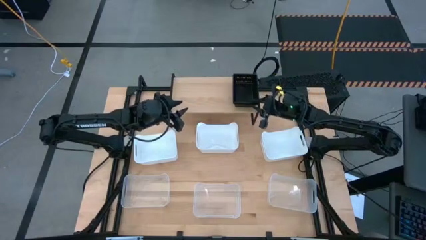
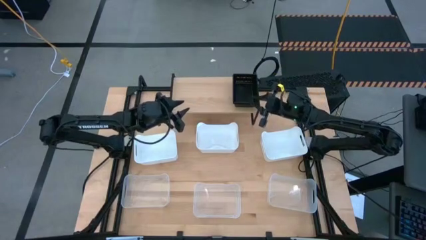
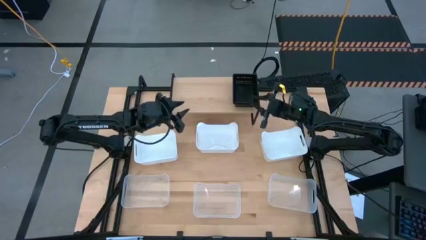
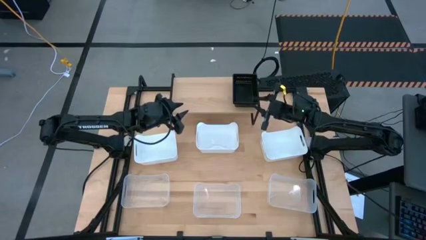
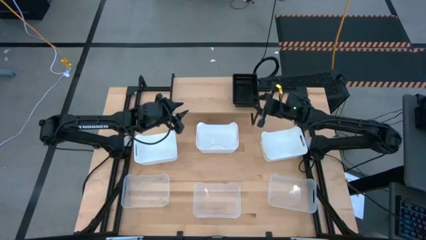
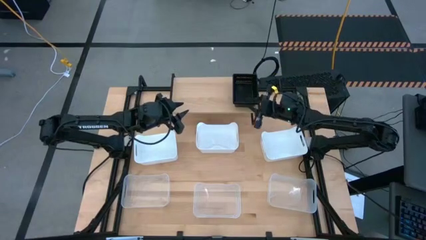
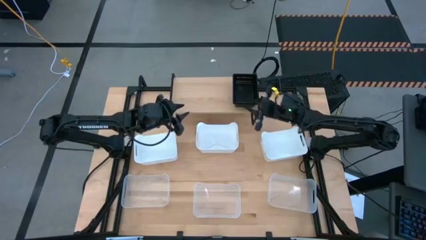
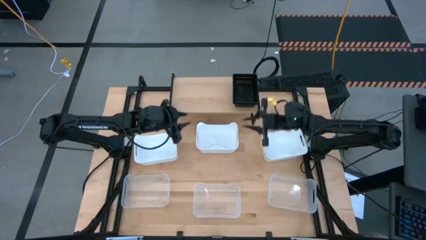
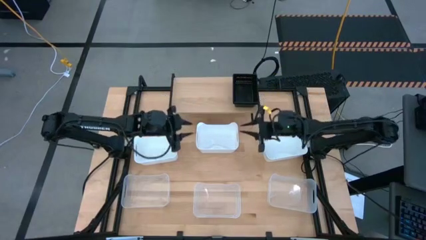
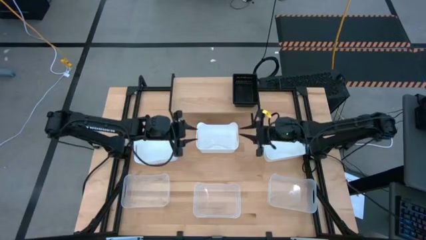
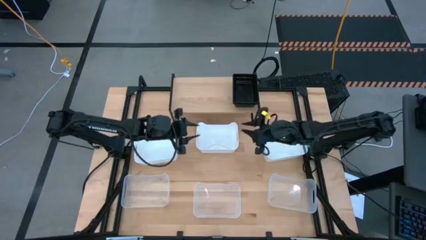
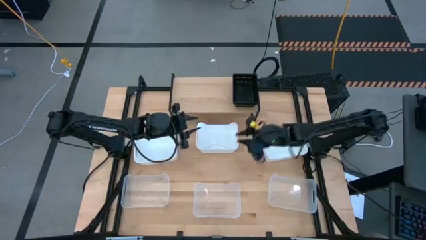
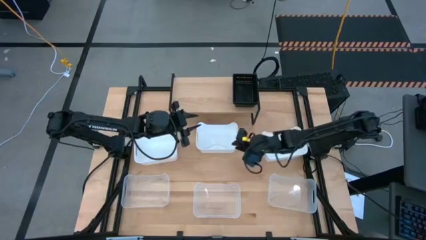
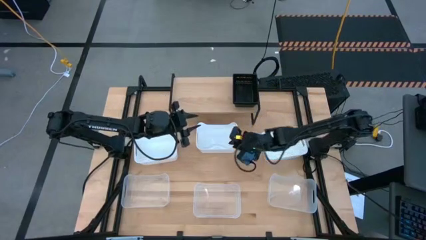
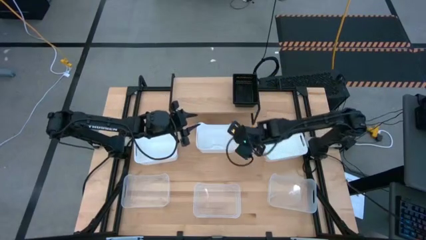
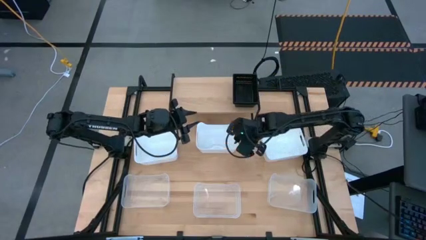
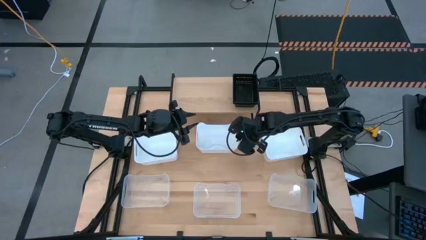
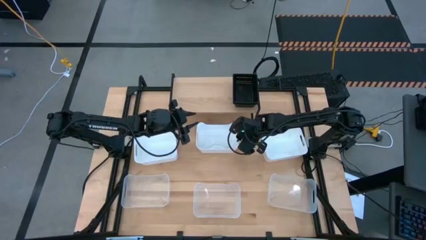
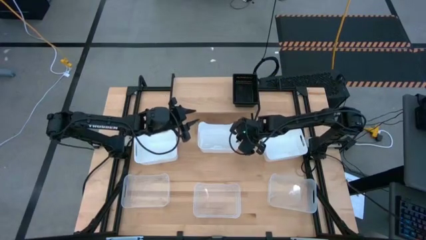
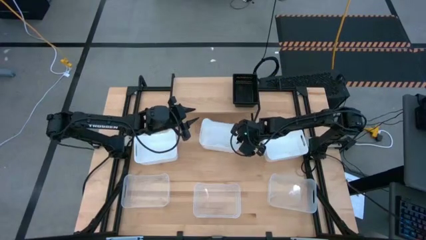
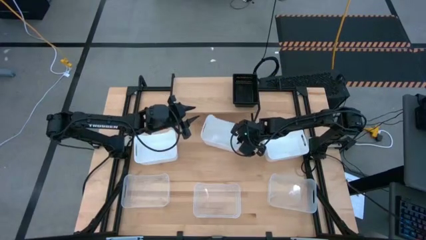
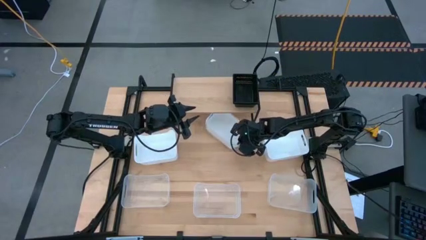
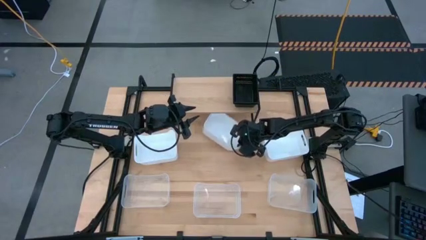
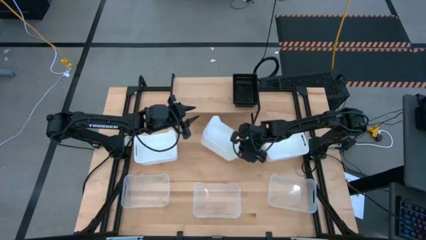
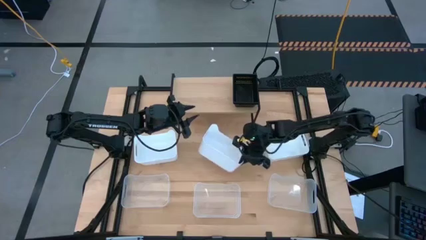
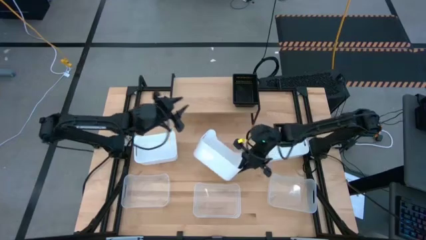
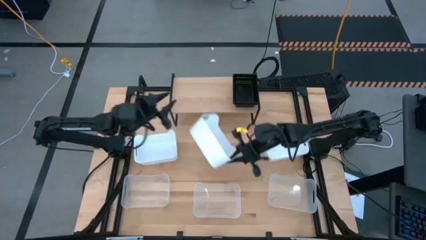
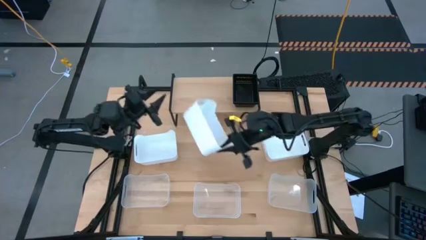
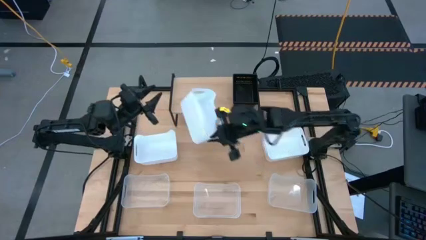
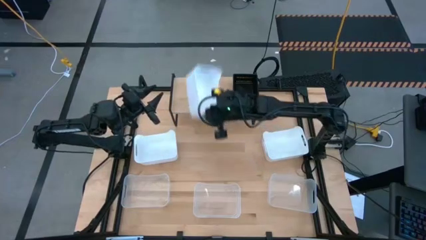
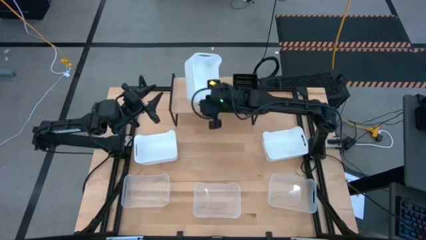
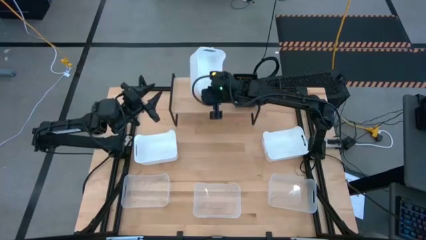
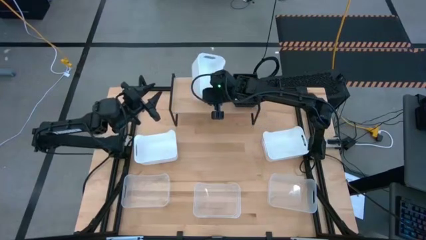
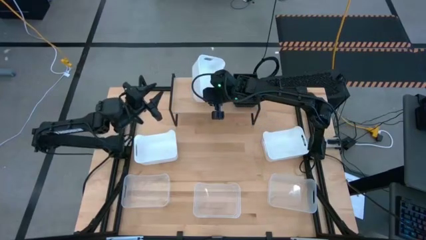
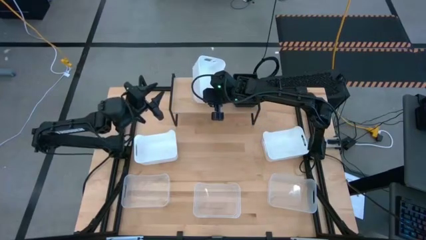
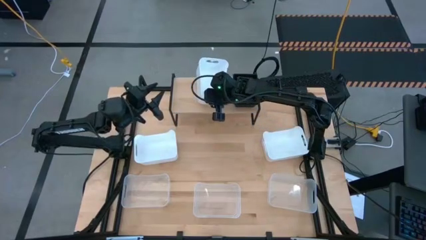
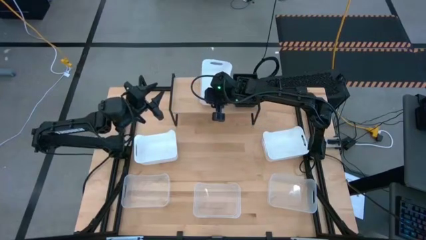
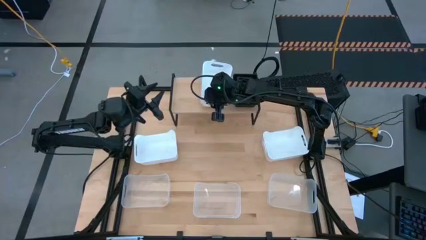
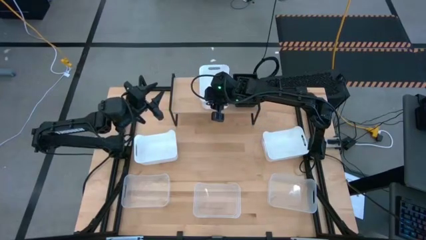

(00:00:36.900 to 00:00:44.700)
Task: Stack baskets on shelf by color
Put the center white bin on the shelf

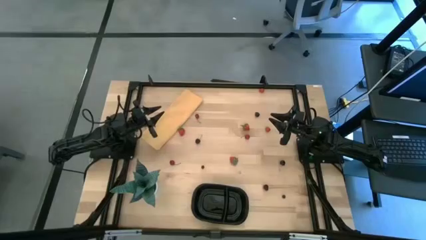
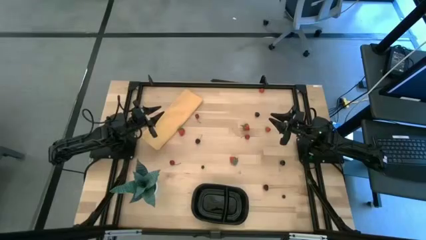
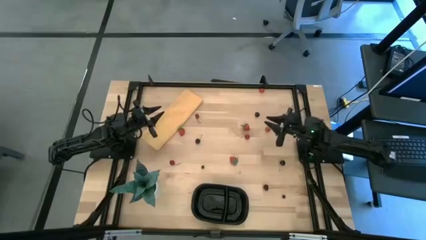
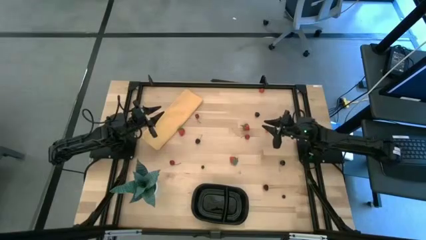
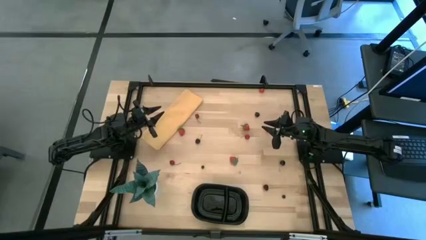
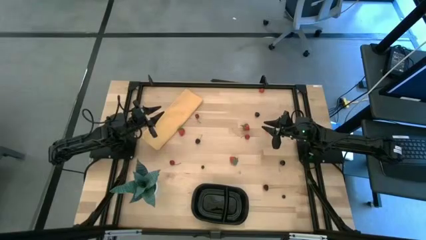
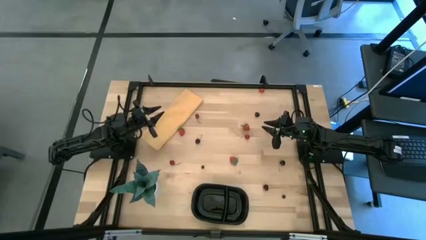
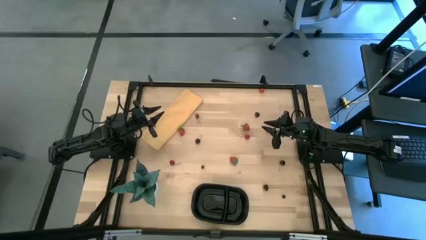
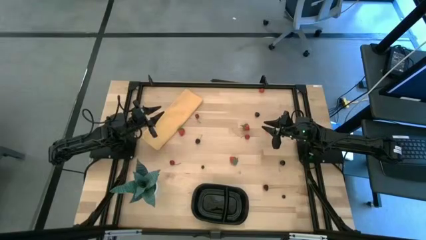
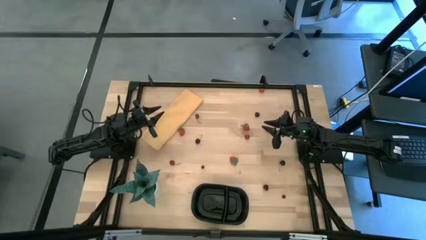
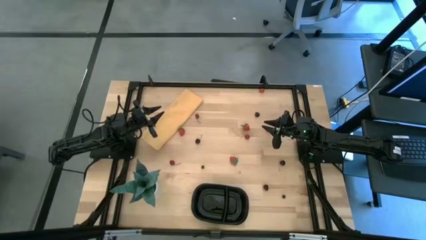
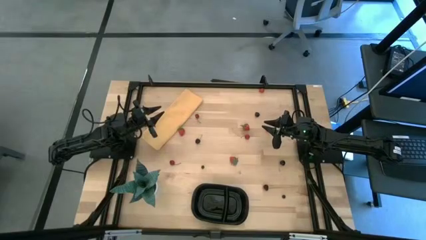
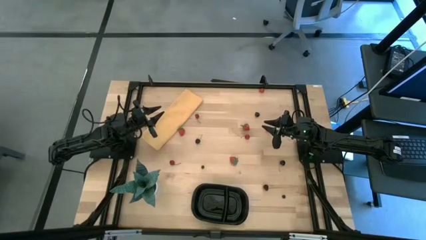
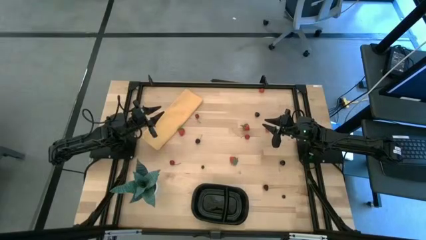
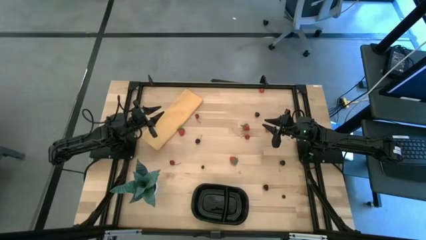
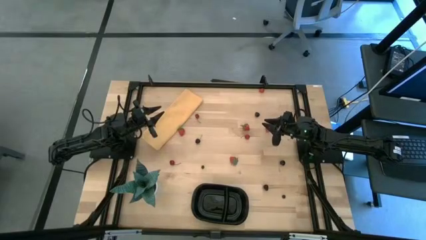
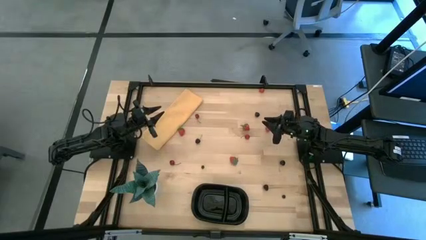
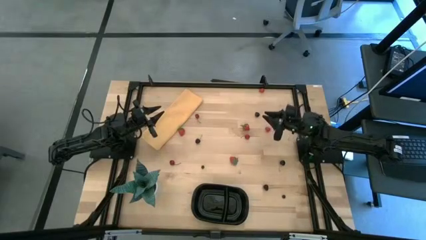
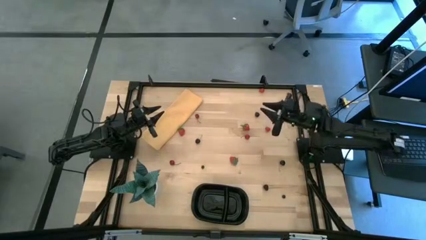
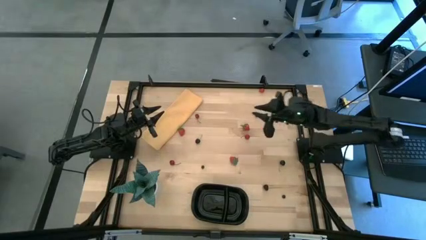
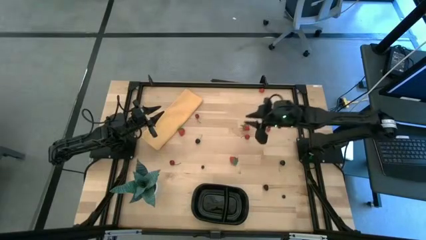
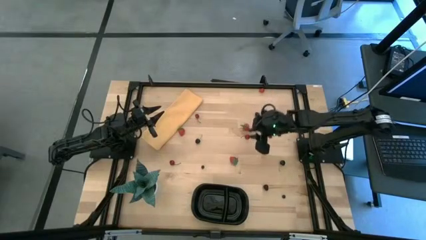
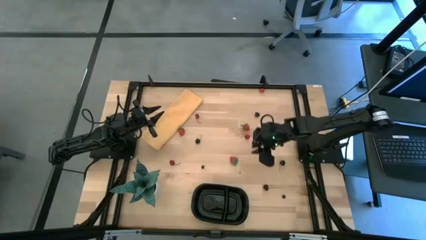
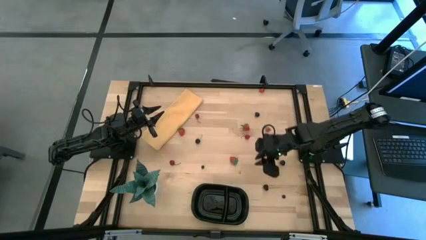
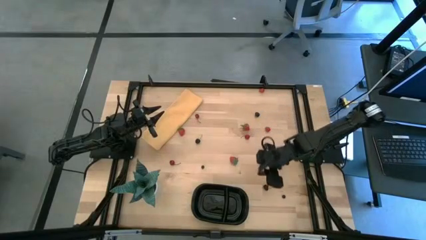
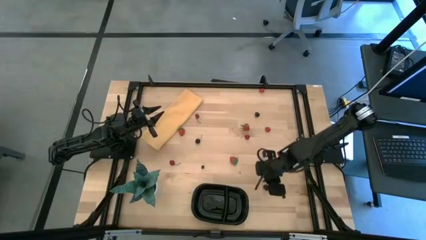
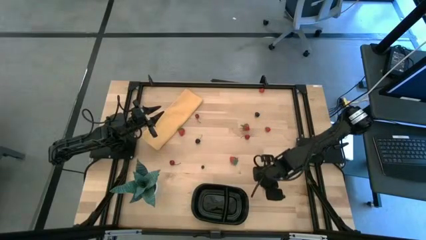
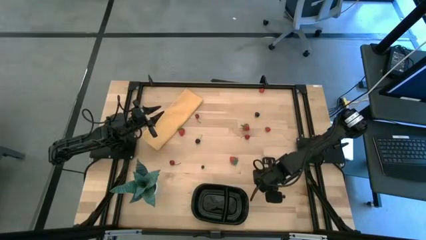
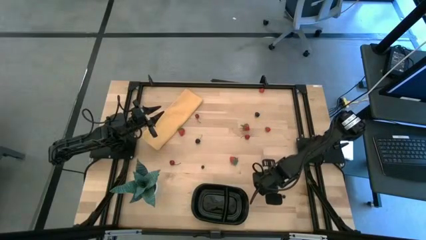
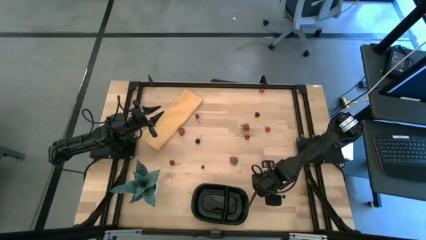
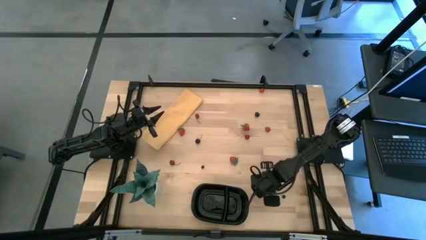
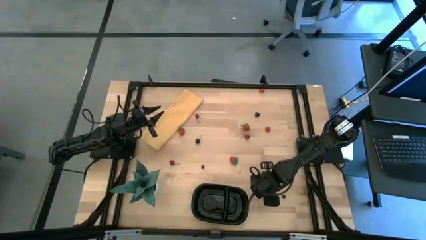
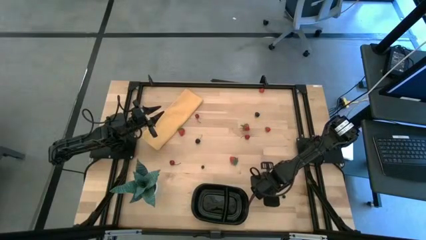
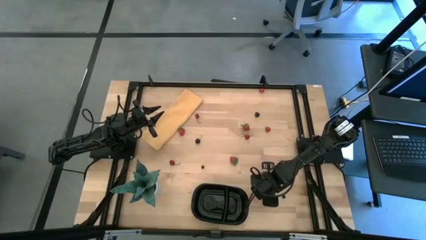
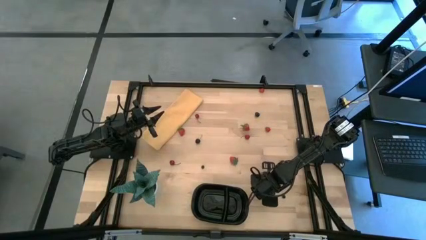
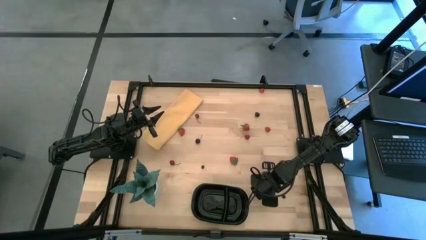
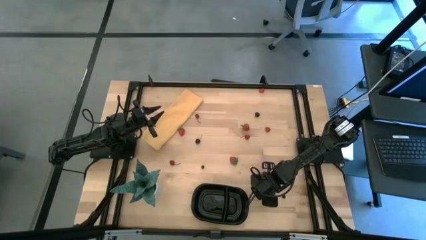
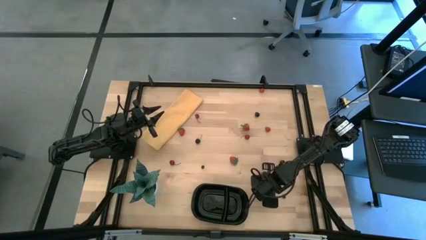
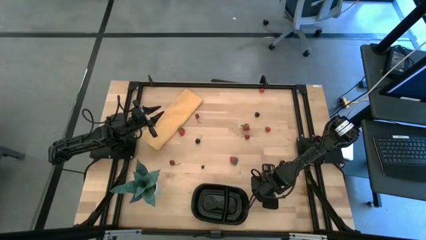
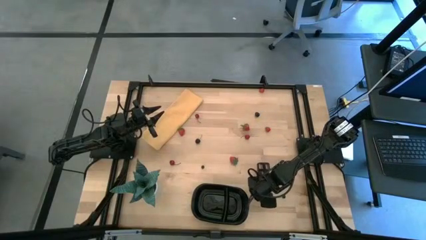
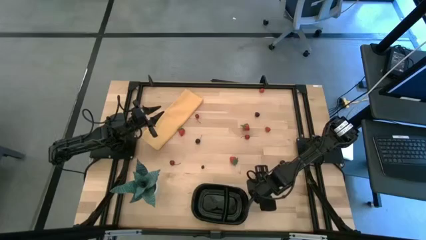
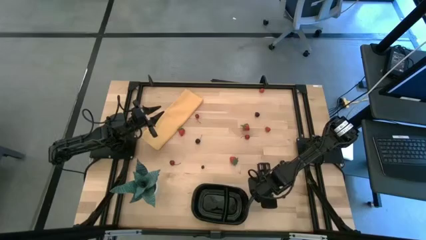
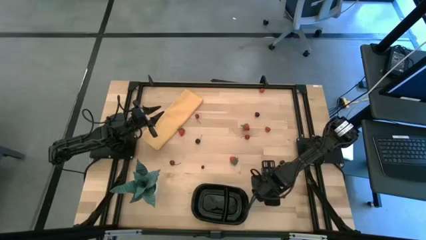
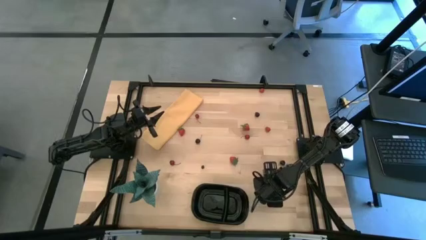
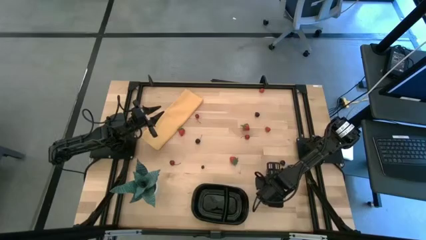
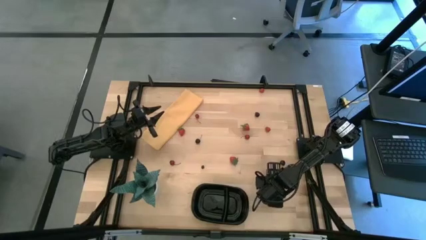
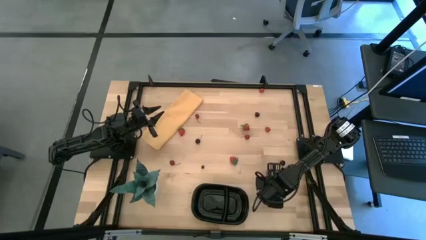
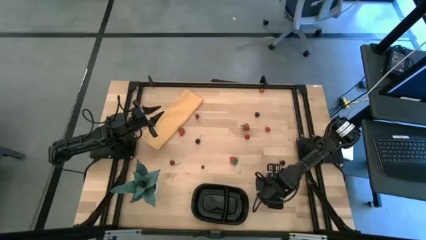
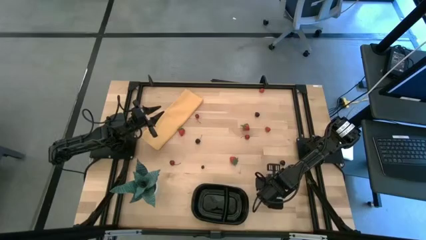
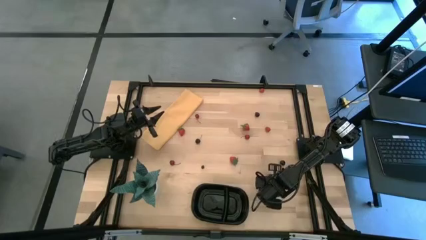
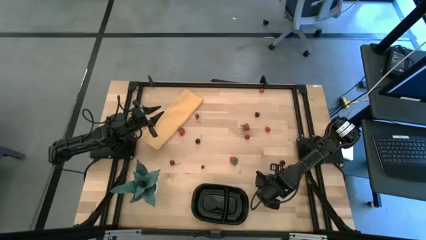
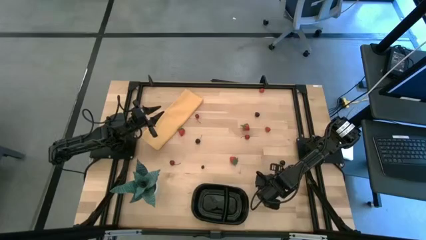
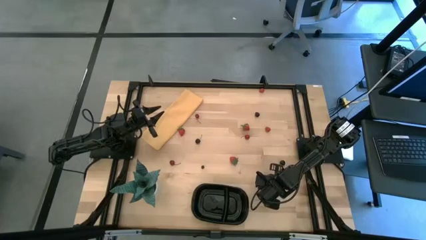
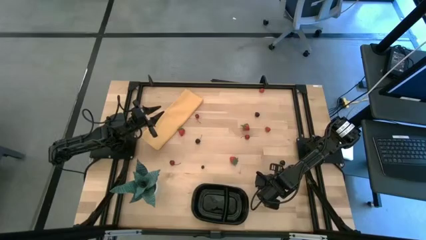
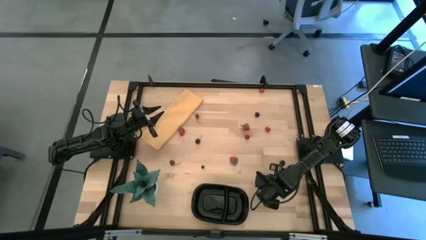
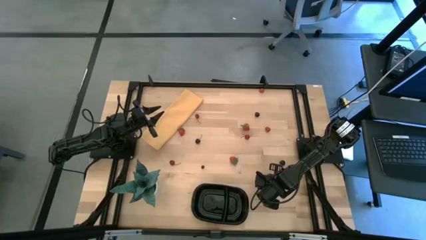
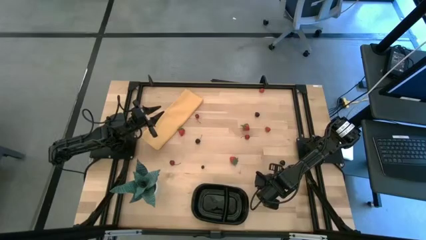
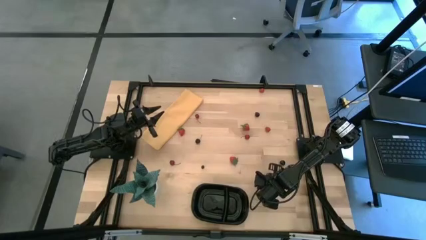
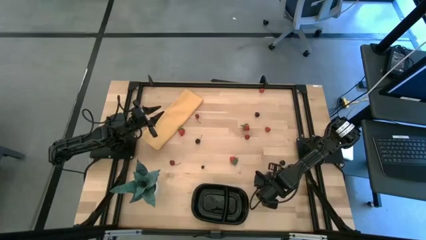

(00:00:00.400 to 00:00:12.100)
Task: Pick and placing Produce into tupperware
Put the bottom blackberry into the black container
